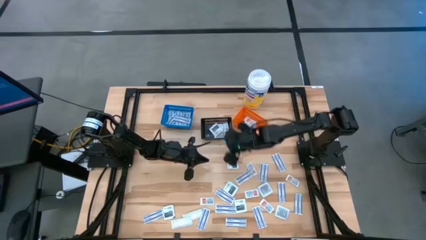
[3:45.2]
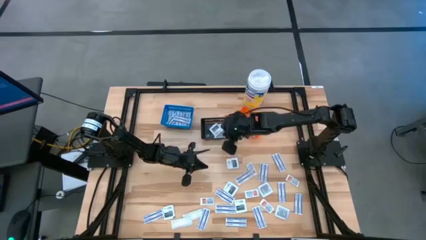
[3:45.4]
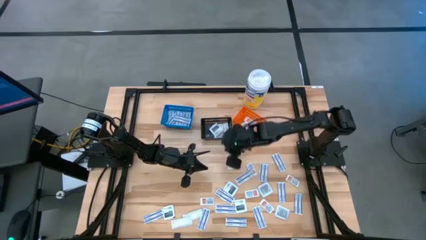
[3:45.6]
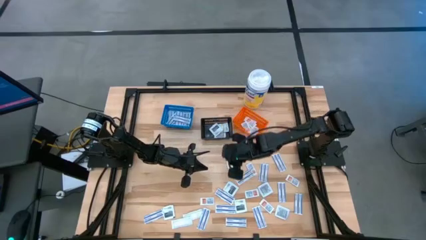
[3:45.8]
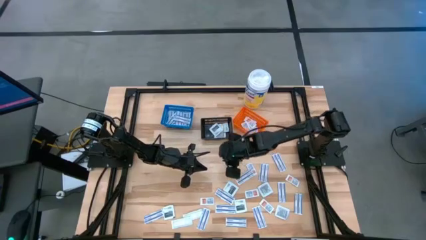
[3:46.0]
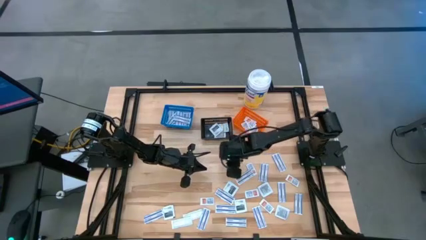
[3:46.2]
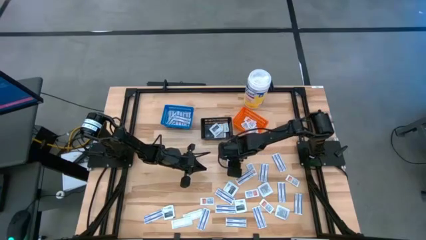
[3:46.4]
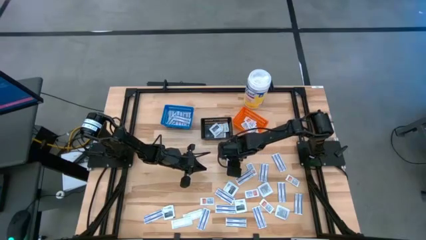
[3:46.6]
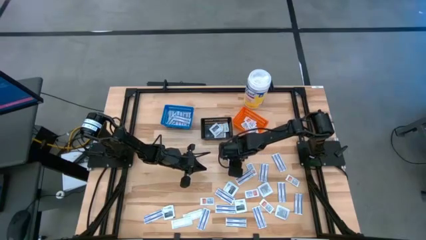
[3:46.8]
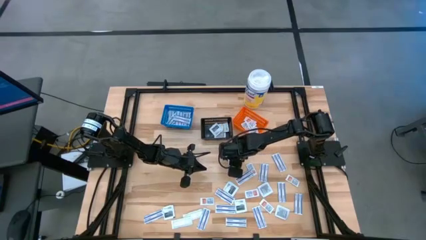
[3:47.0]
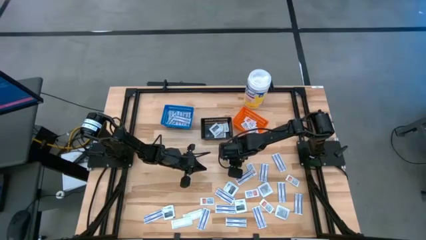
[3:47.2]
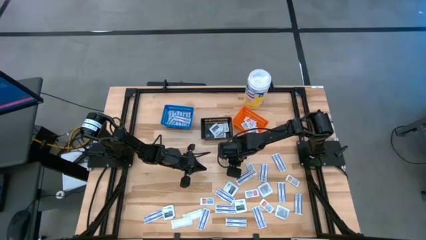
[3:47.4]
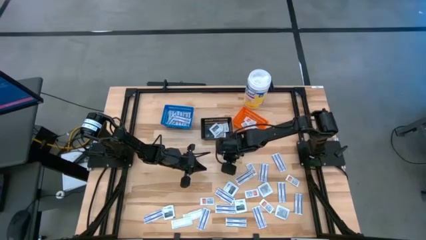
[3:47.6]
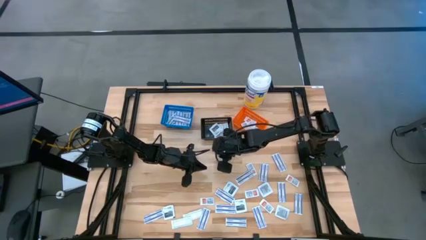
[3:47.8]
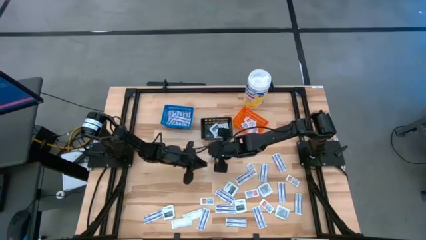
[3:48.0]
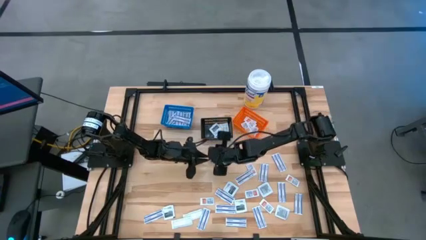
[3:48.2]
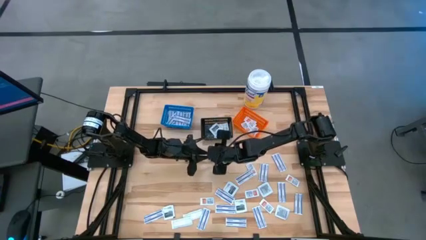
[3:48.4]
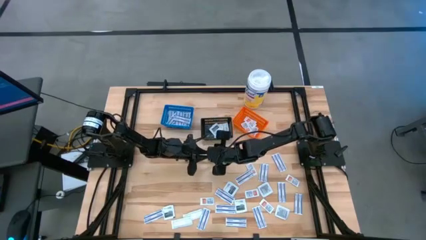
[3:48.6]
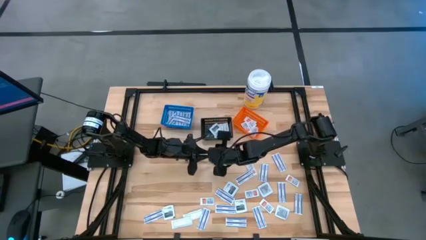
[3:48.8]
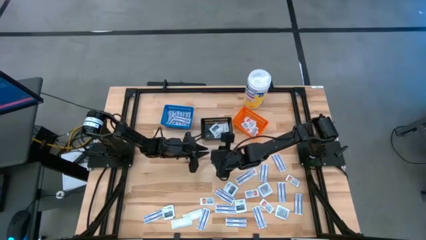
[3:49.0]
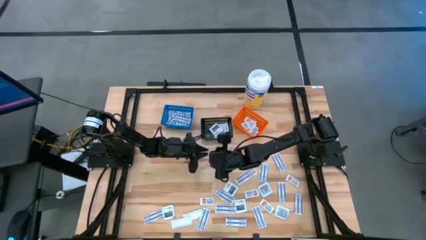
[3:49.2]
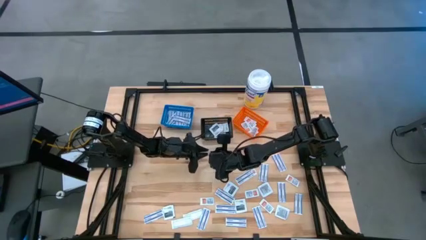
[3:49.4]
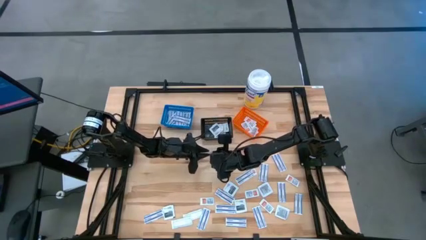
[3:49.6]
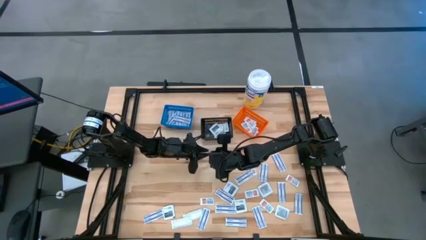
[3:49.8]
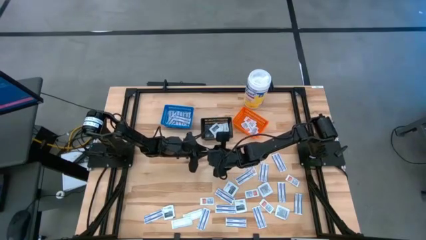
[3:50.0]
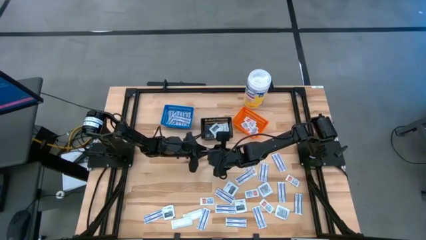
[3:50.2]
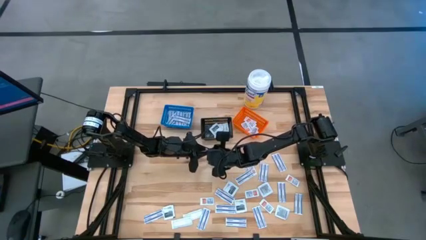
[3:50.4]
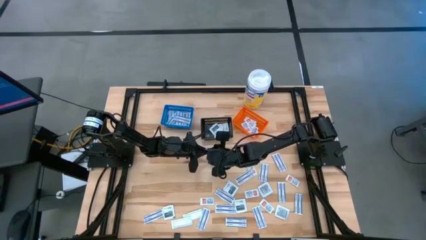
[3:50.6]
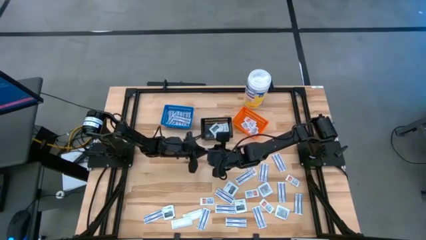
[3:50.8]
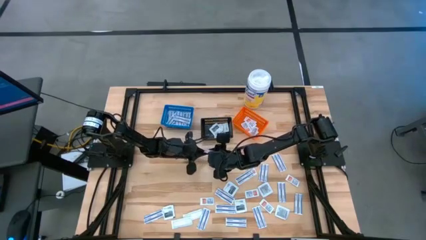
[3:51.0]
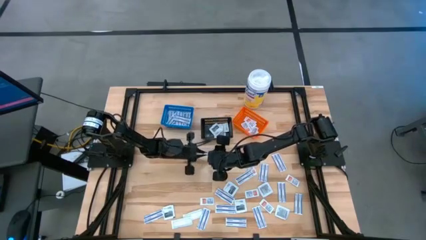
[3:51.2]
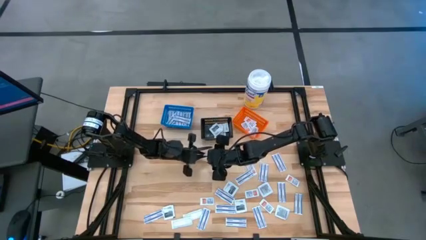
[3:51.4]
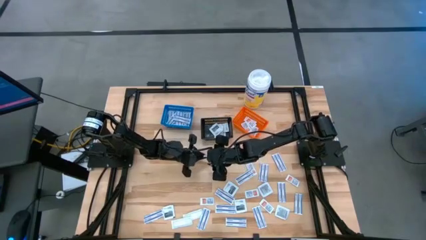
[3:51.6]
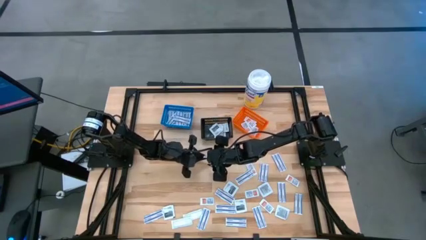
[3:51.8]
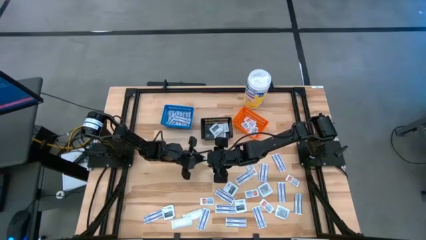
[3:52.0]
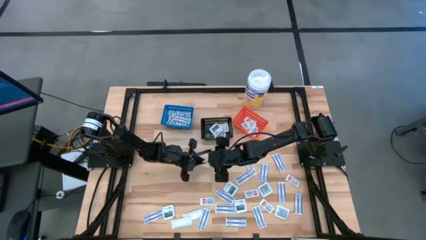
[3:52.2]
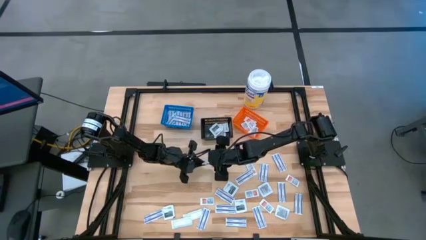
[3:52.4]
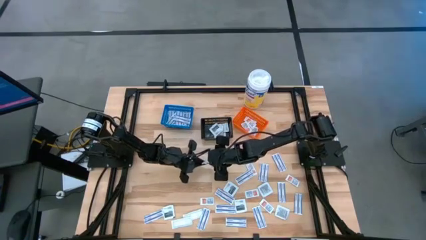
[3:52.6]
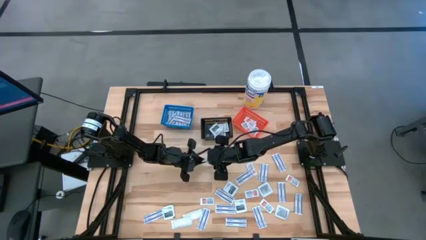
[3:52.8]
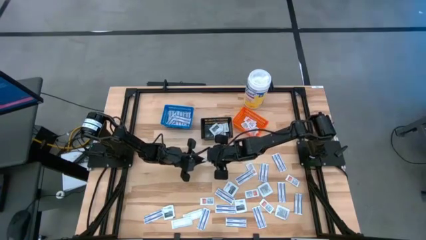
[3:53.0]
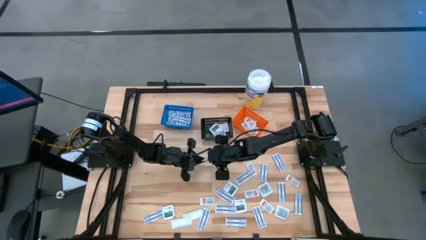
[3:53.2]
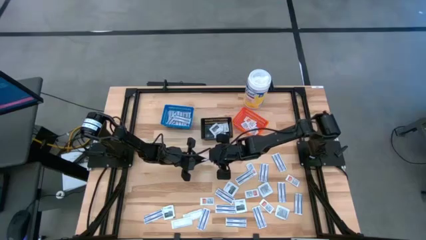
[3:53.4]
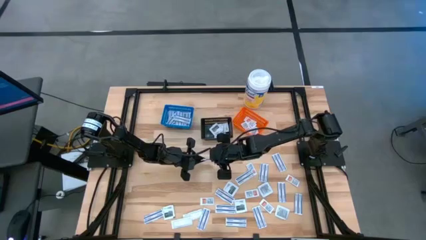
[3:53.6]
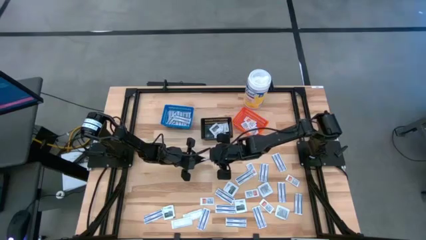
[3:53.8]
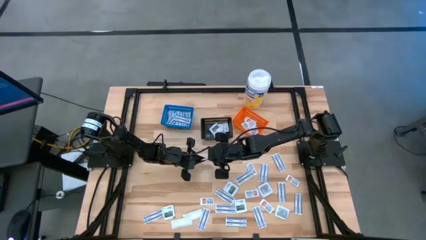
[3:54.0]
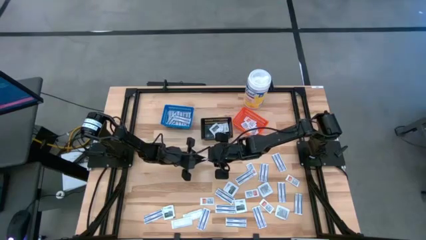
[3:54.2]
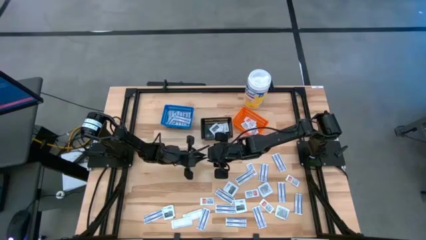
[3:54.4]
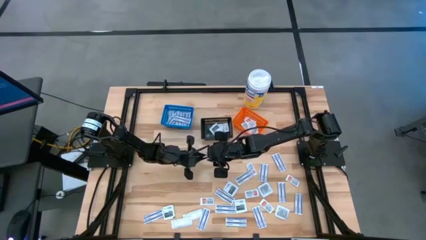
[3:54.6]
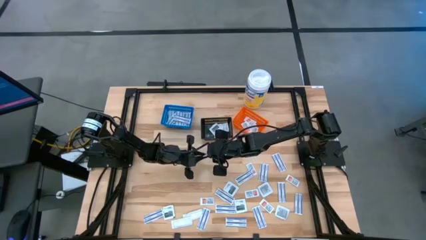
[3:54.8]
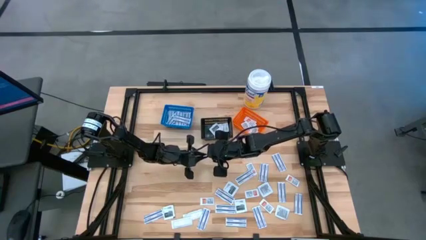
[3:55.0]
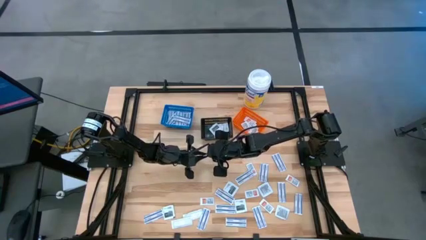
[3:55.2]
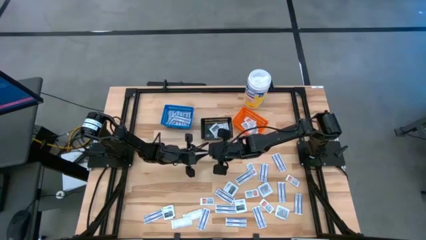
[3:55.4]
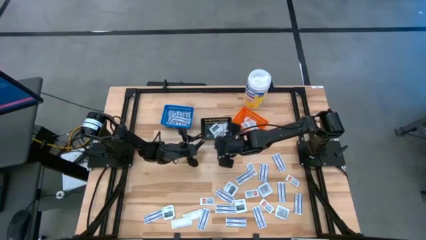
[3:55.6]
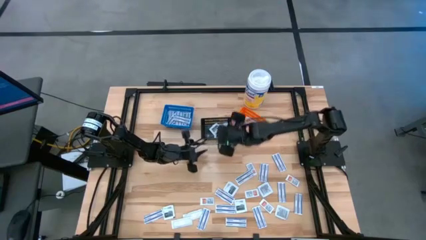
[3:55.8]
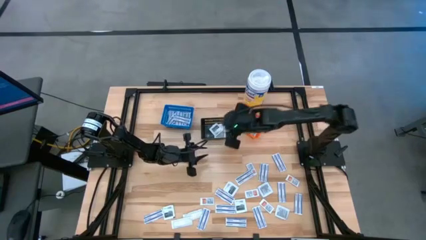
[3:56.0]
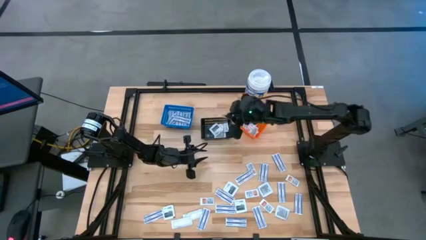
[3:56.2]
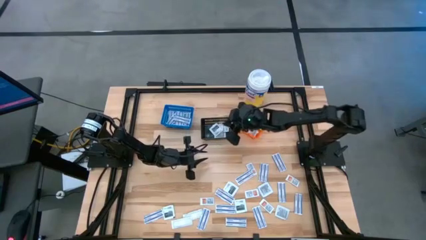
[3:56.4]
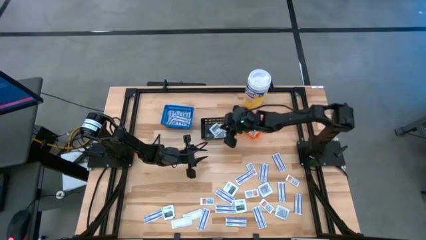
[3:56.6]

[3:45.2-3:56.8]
Task: Pick & Place First Aid Supplies
Put the towelette pack into the black bin

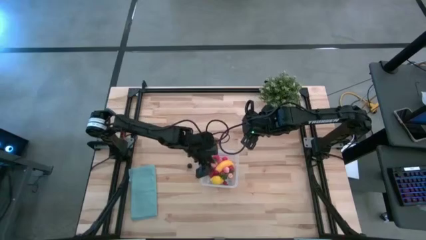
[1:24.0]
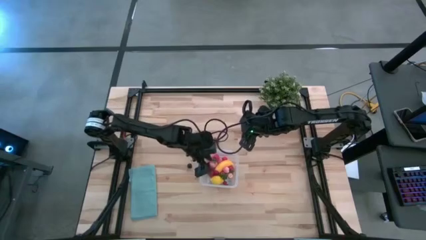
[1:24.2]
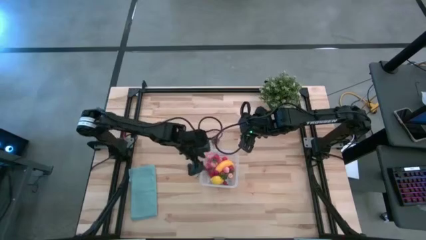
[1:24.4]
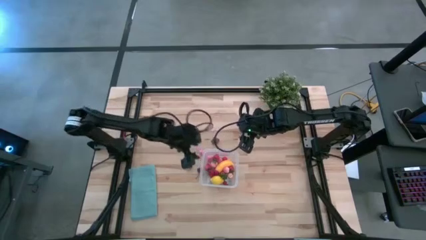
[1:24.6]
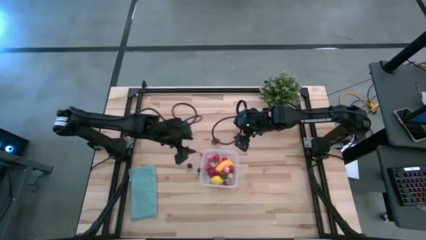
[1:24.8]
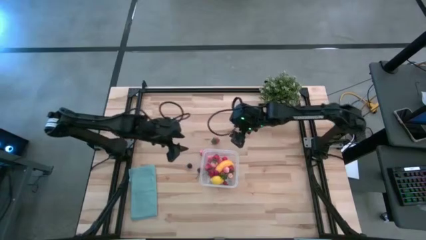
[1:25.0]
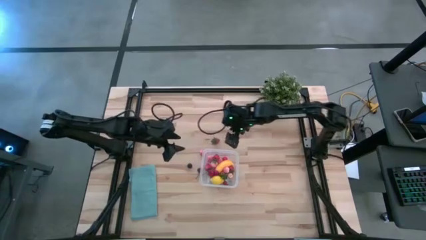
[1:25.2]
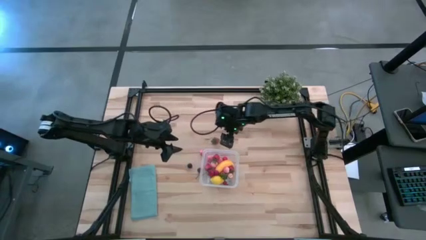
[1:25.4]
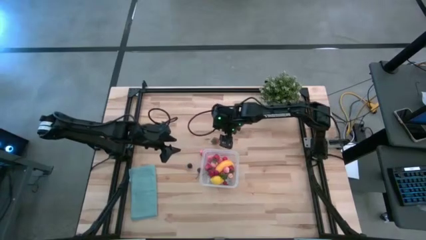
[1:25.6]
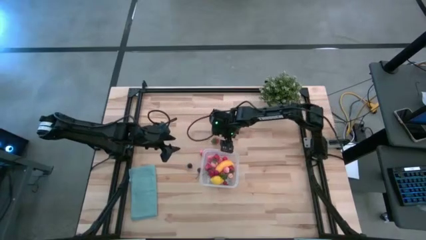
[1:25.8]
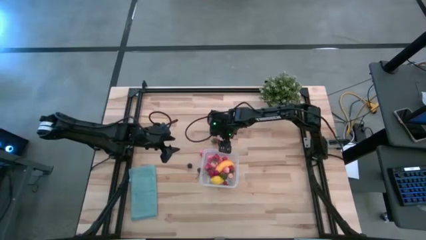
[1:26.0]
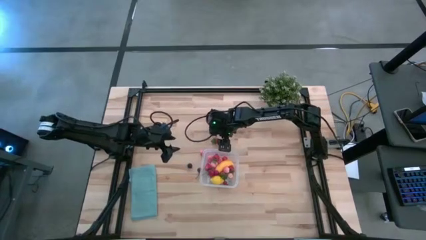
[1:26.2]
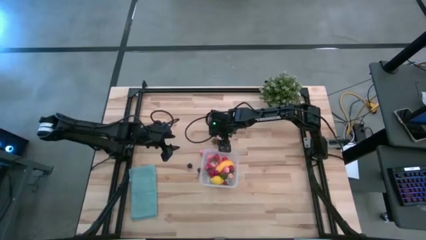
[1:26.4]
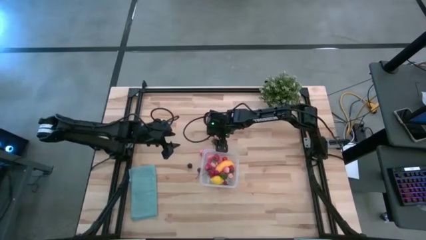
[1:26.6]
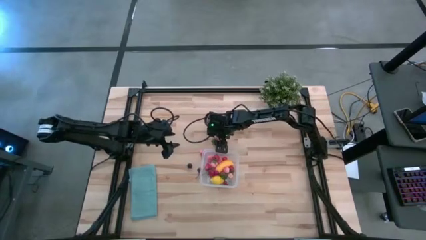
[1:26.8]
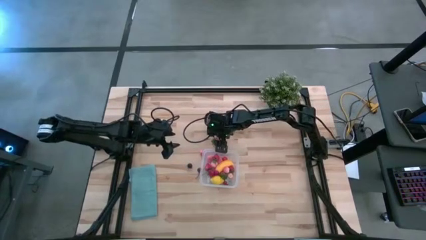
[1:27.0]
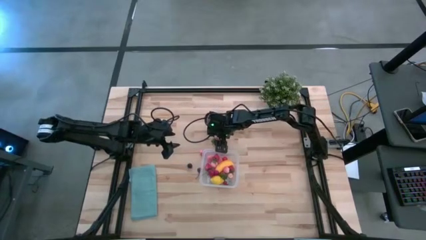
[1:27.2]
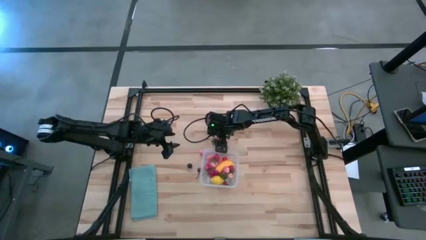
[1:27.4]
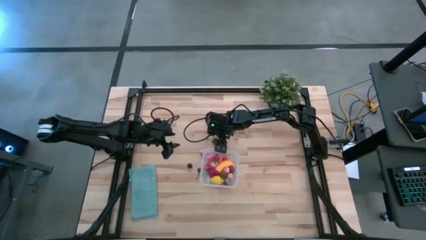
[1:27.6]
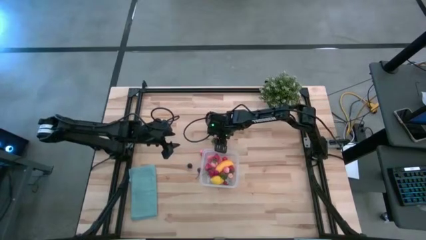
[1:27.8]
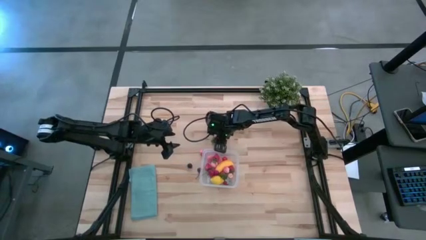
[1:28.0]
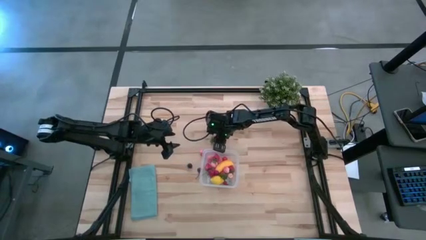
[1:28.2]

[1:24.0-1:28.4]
Task: Pick and placing Produce into tupperware
Put the red strawberry into the transparent container

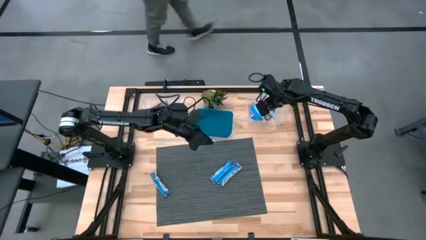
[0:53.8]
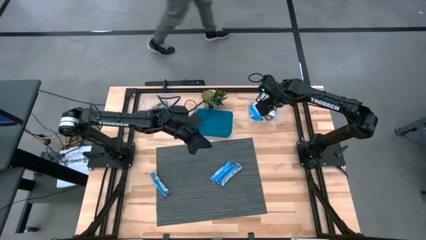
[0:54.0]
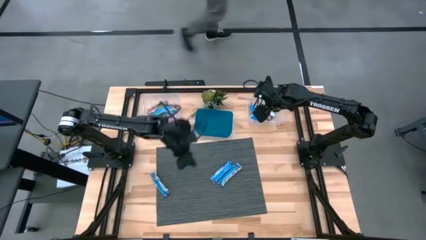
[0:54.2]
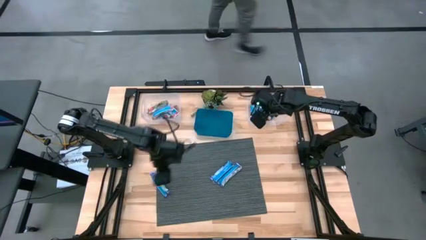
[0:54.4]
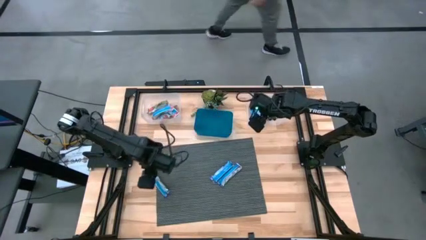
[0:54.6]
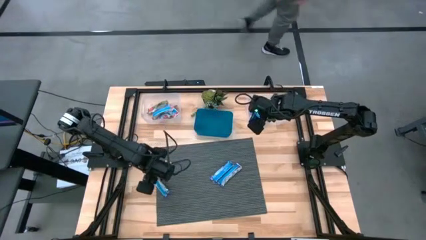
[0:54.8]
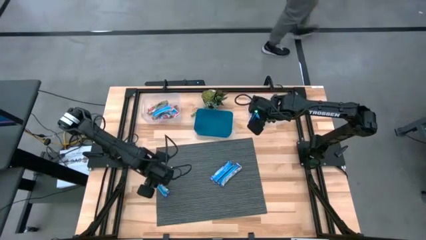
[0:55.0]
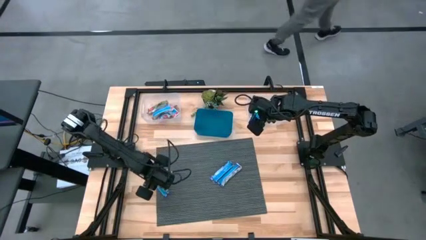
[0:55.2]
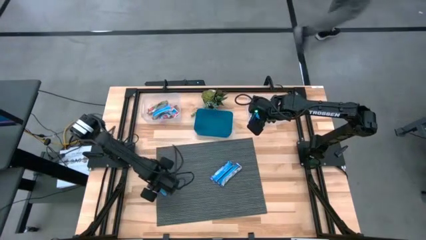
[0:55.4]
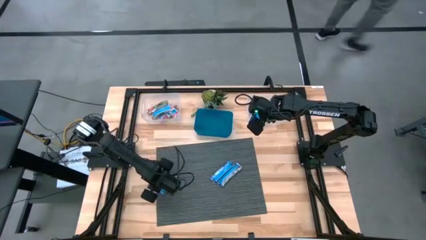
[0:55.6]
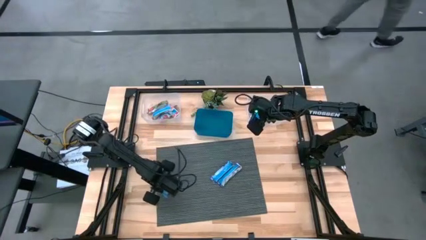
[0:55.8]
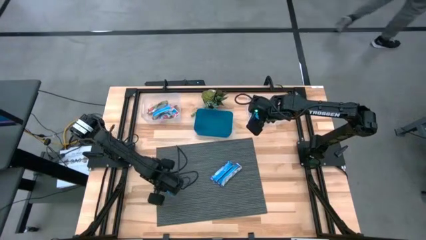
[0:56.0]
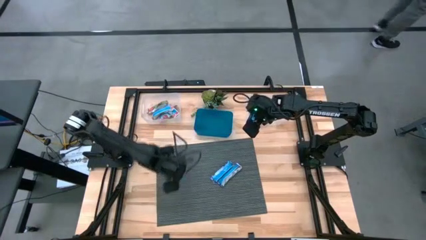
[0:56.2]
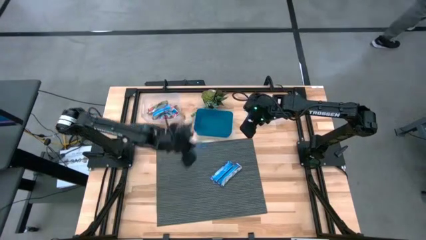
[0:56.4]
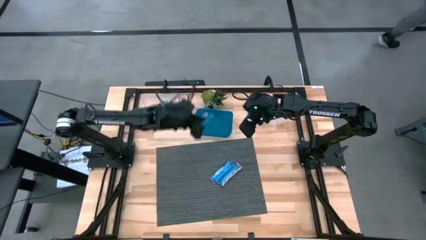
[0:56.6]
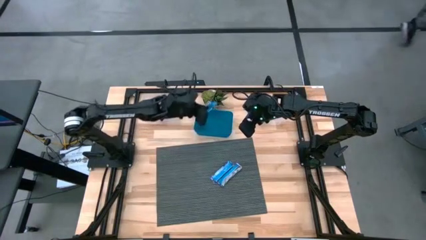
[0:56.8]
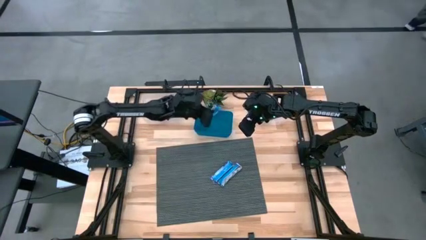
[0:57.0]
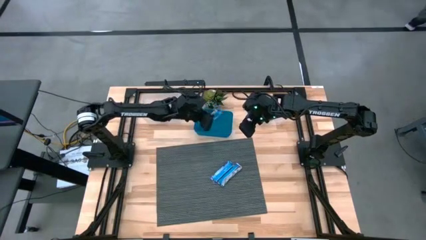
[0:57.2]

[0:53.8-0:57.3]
Task: Pick and place Granola Bars by type
Put the blue granola bar into the blue bin
